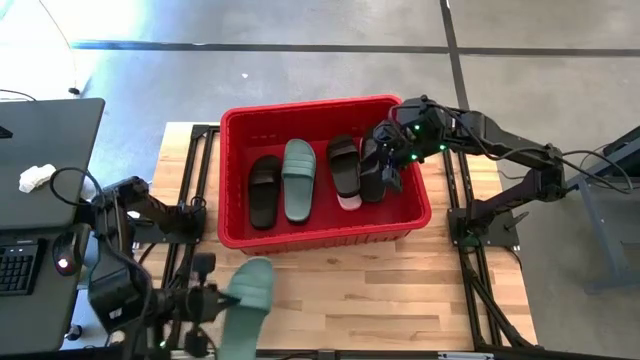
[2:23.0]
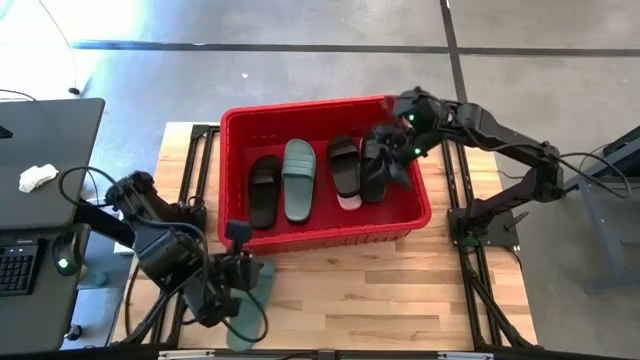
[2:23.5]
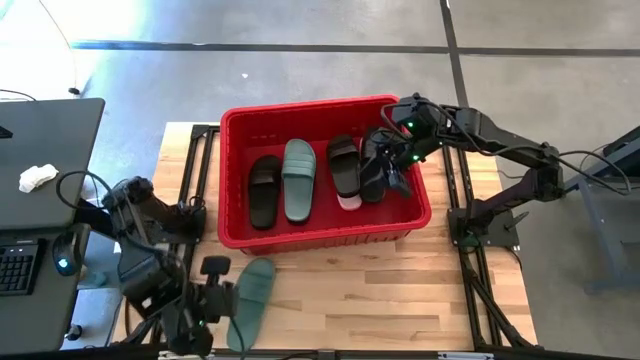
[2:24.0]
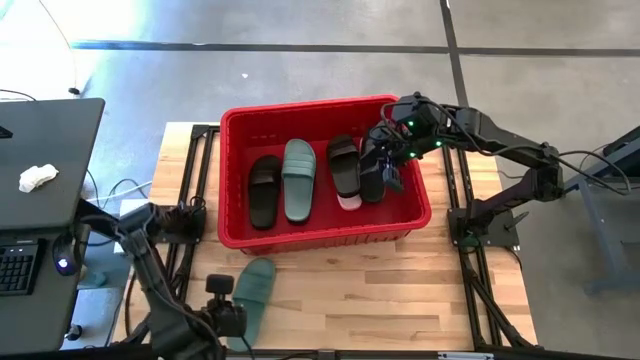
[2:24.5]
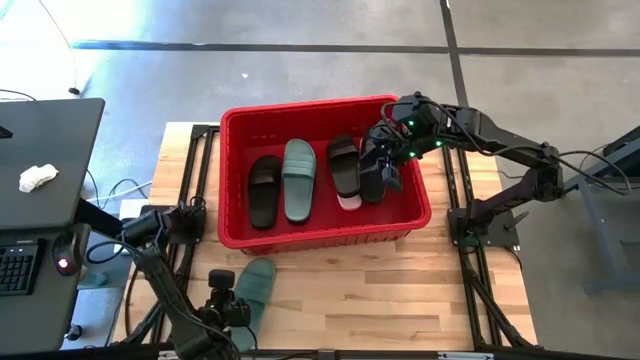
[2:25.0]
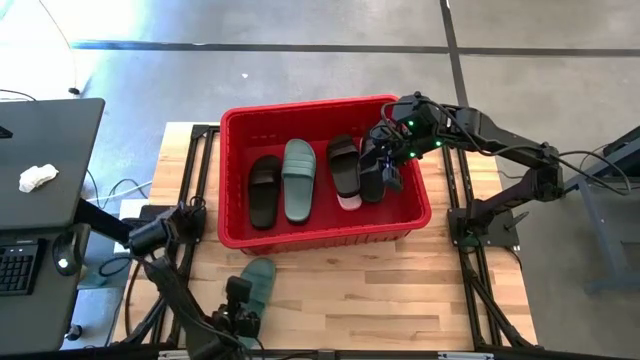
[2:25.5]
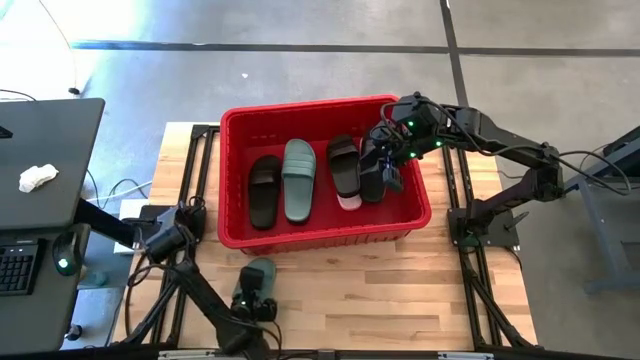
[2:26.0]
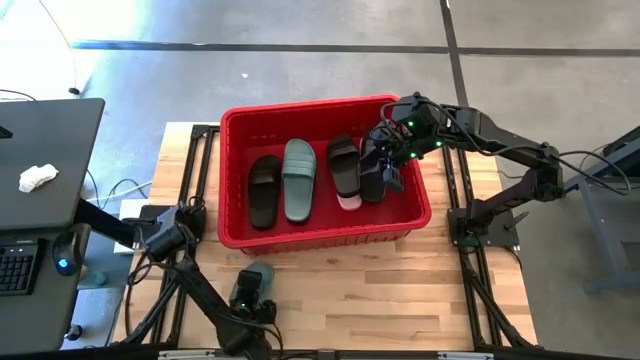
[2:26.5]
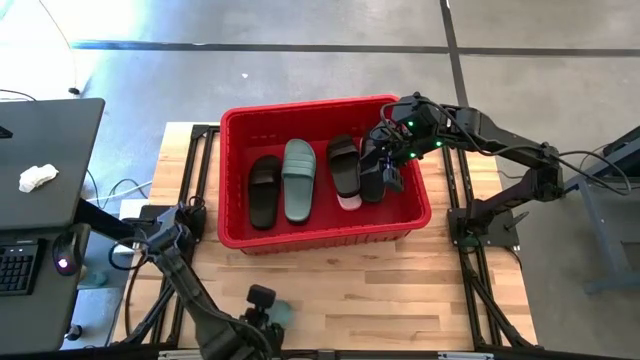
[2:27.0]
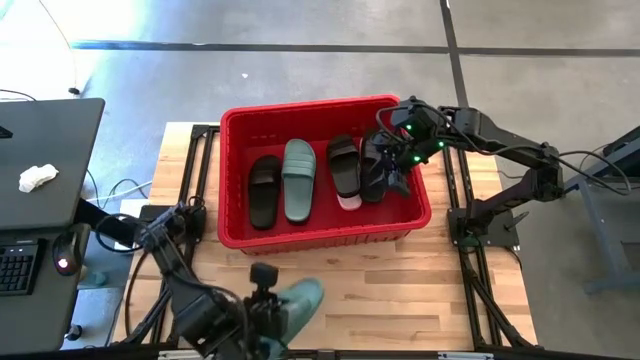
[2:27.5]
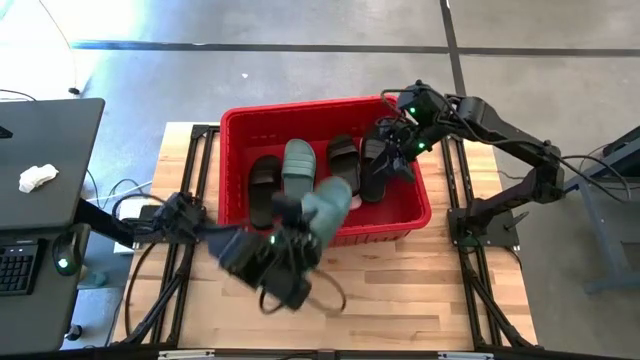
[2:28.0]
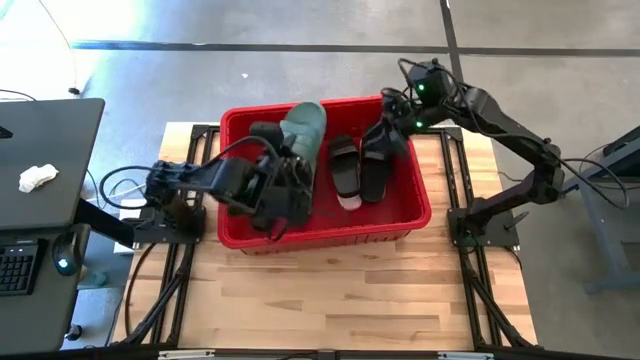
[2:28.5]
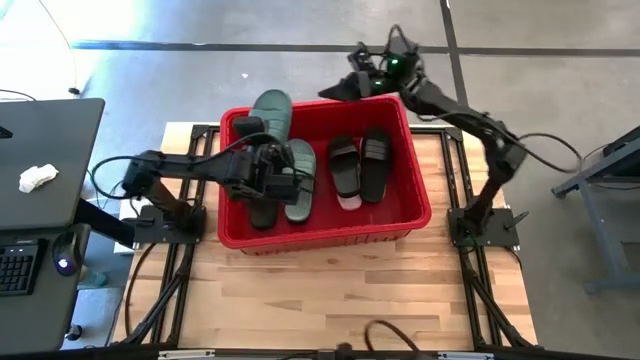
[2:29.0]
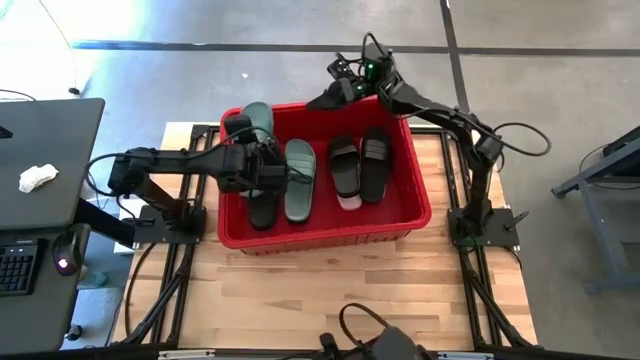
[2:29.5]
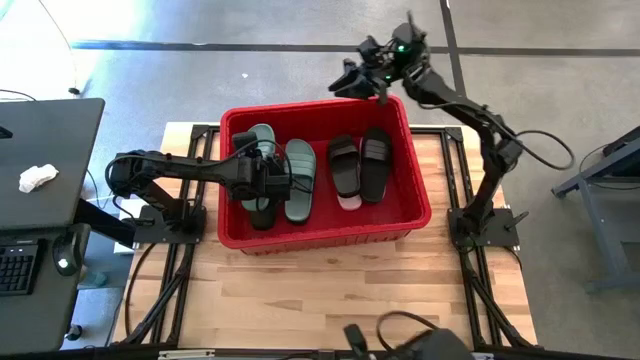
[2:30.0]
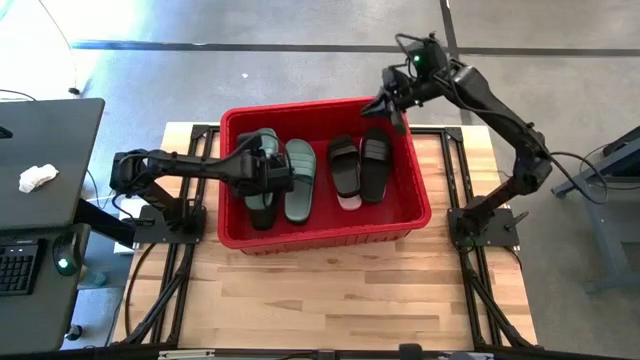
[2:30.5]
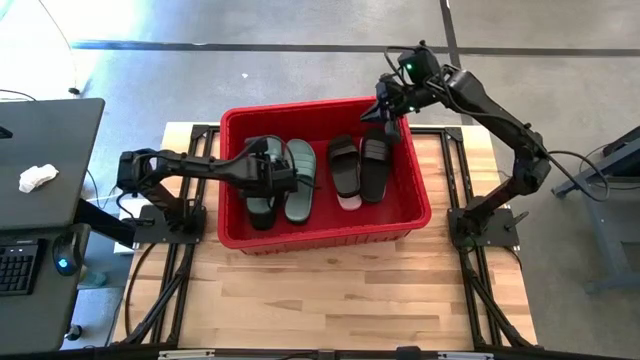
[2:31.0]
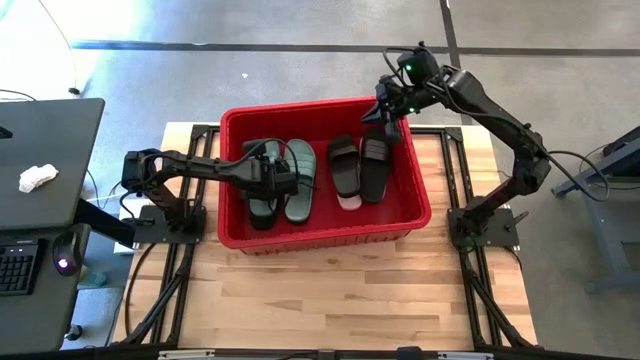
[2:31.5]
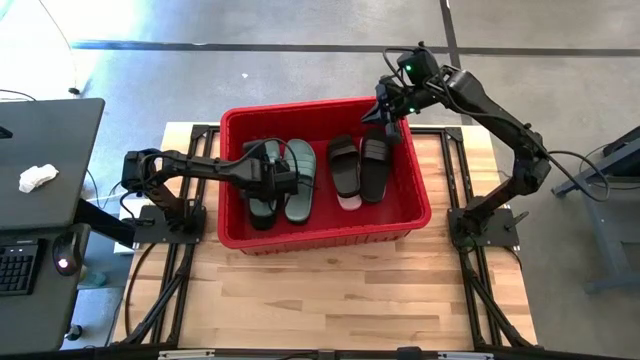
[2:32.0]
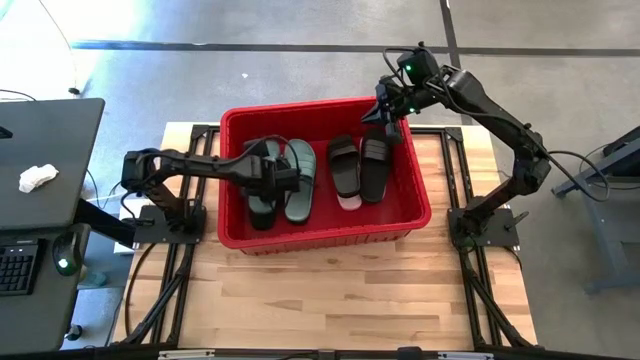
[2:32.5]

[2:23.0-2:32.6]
Task: Pick and place slides into bin
Stack the green slipper on top of the black slipper in the red bin

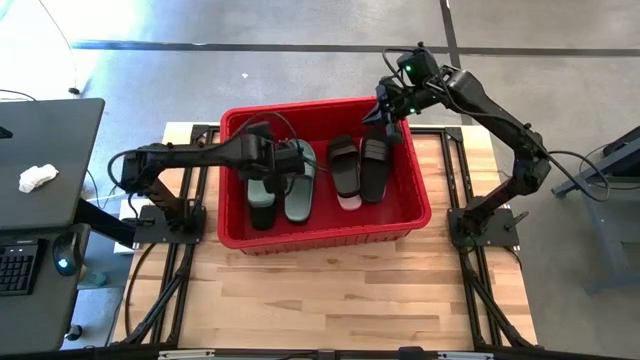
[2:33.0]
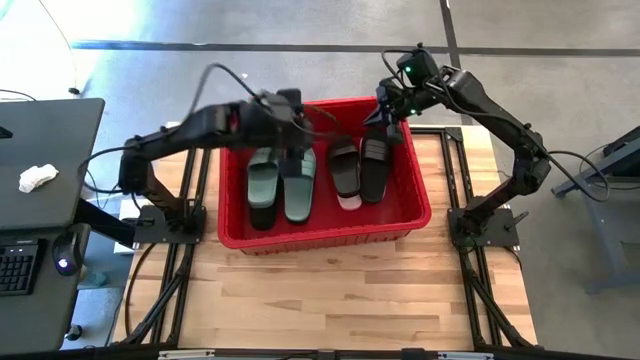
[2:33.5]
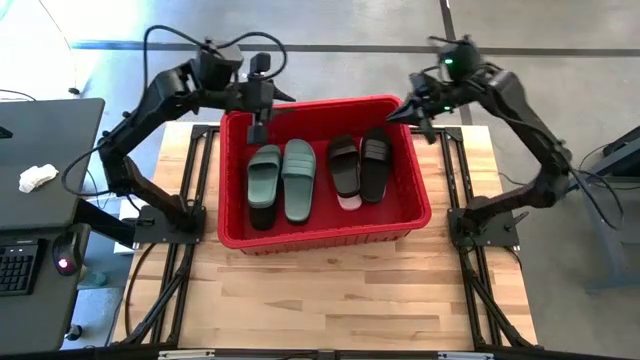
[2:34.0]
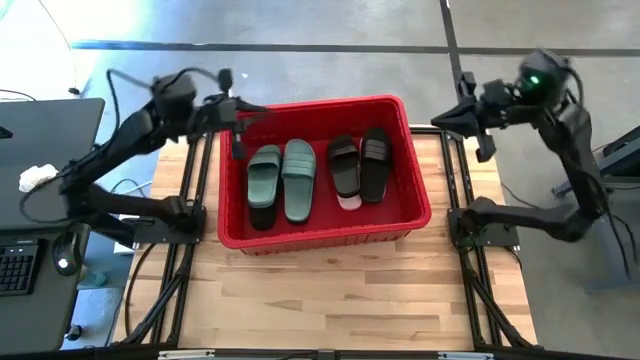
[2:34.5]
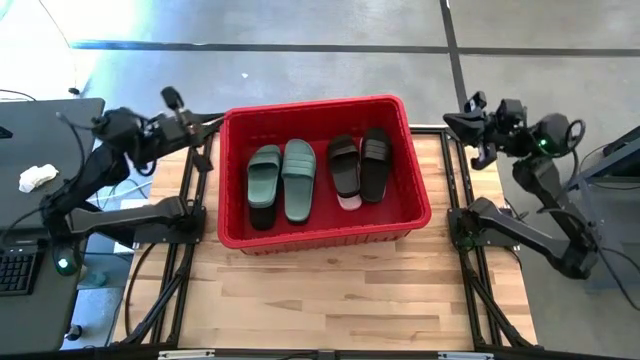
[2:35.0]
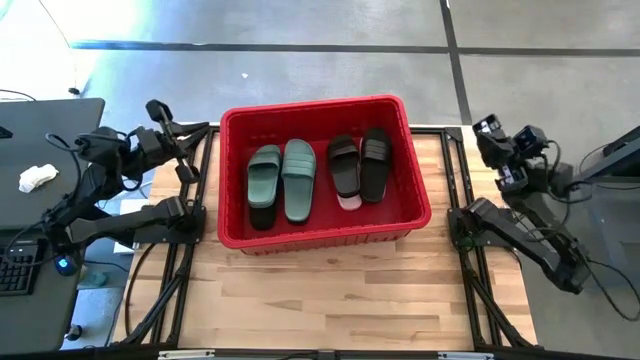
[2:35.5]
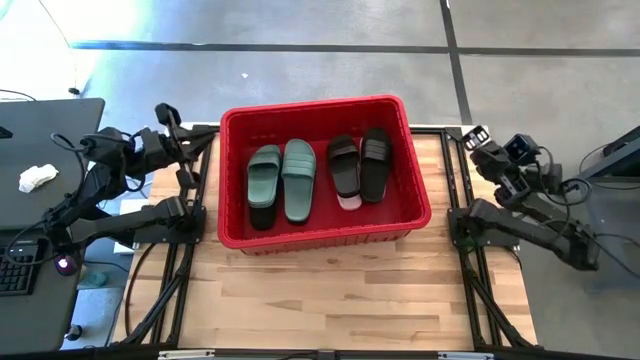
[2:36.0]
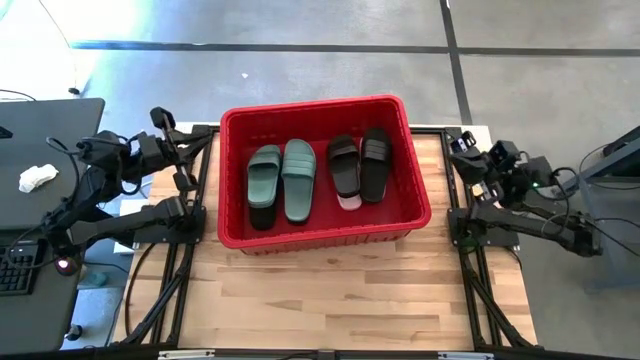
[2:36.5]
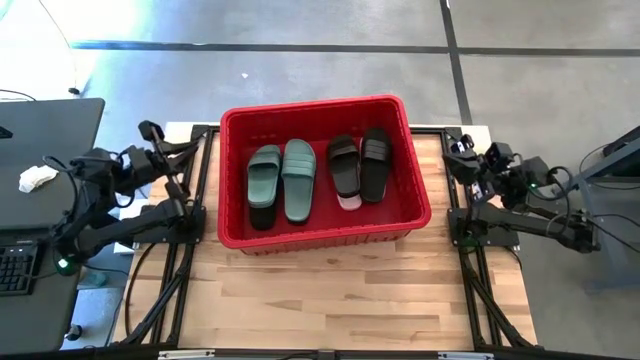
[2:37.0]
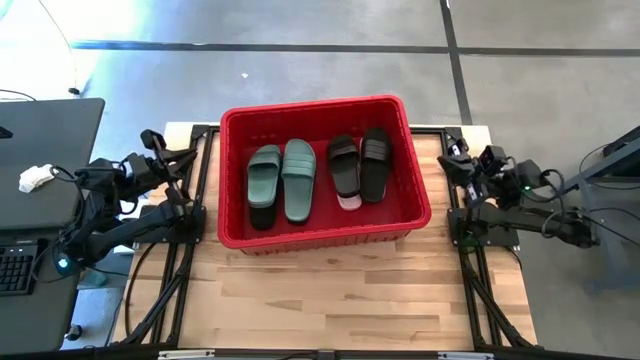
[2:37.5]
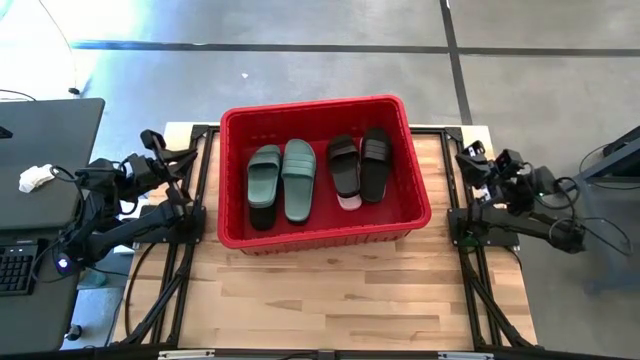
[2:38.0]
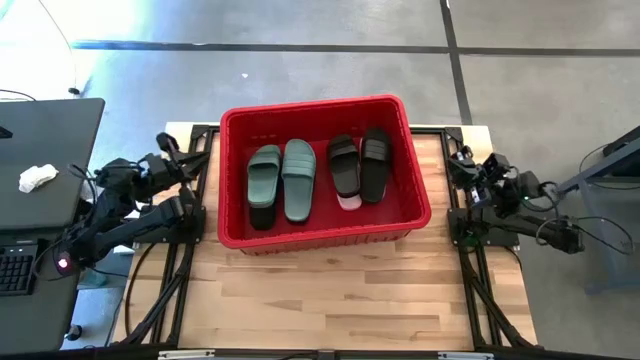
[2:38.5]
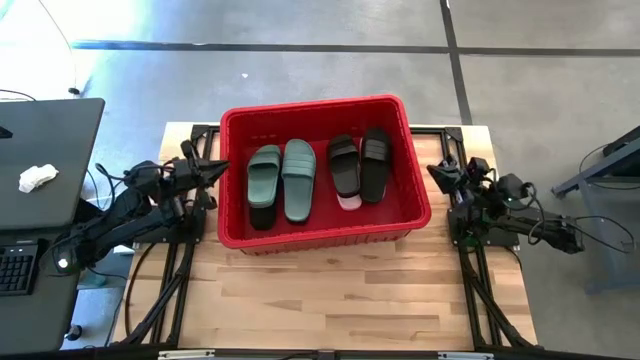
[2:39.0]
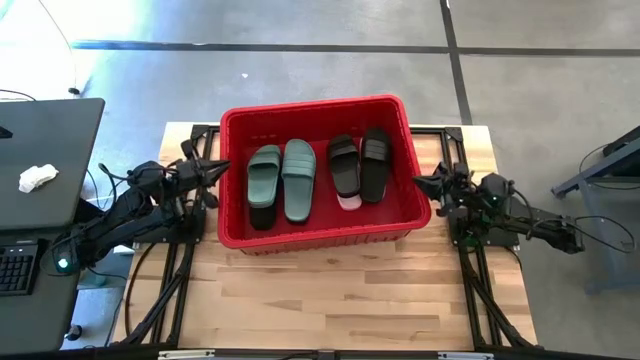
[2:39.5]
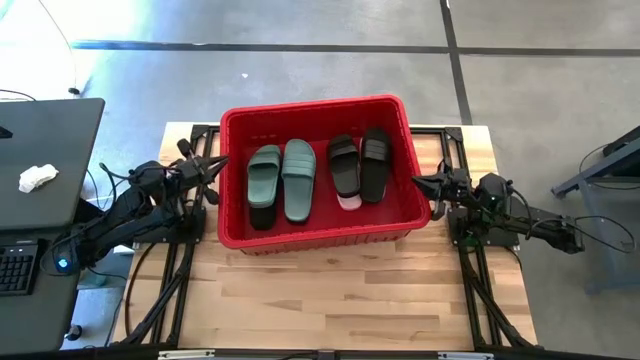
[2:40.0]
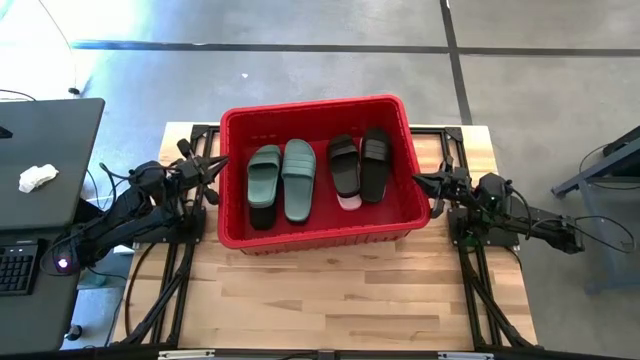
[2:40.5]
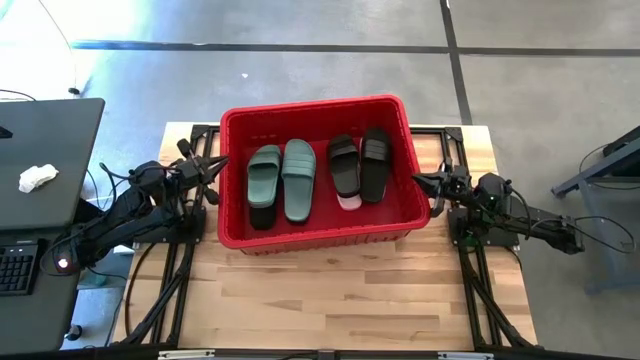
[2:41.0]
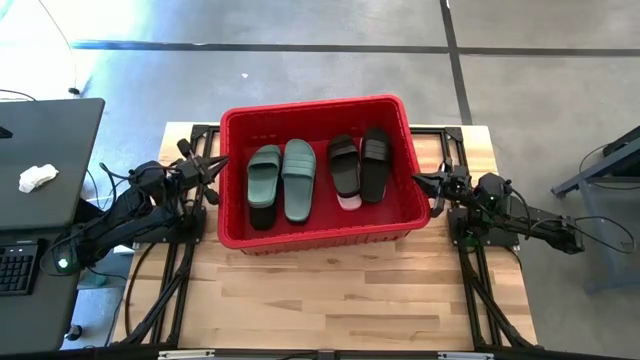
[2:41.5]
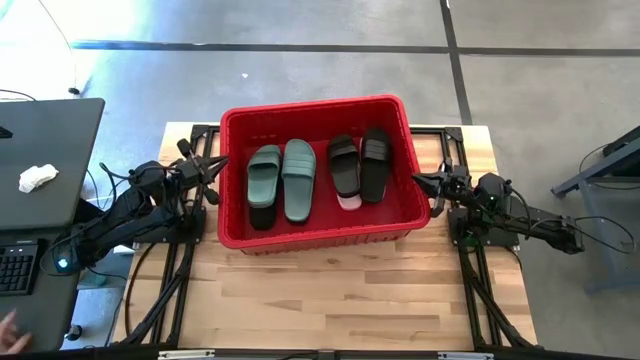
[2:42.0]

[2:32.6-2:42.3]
Return to Home Position

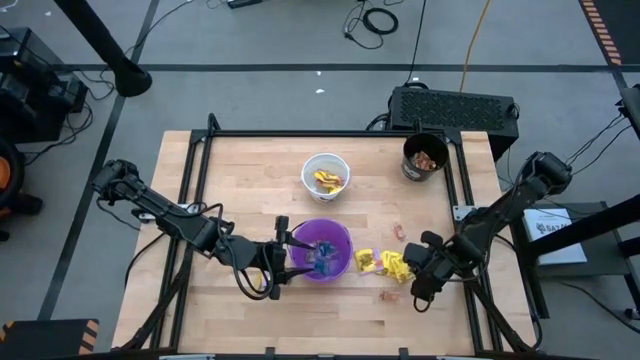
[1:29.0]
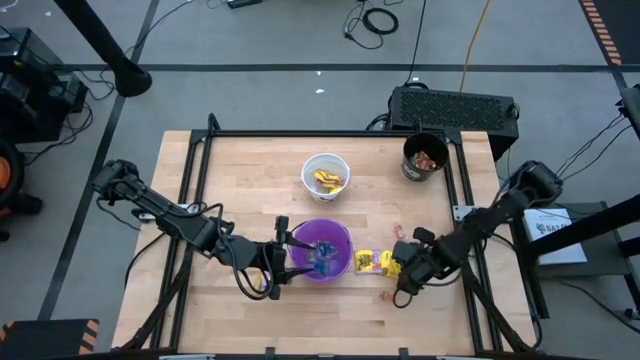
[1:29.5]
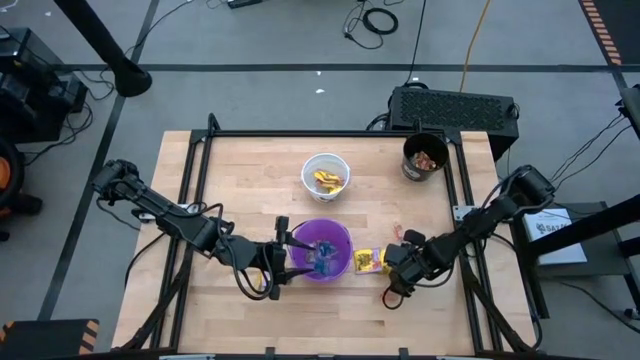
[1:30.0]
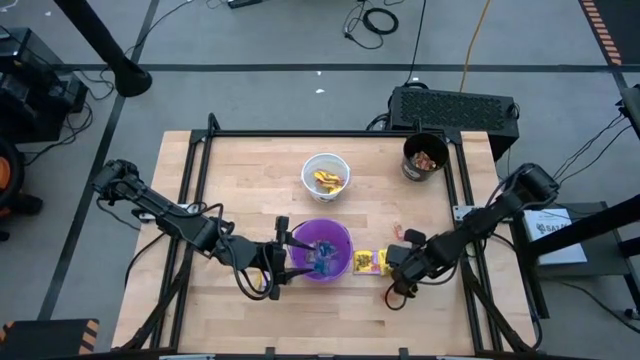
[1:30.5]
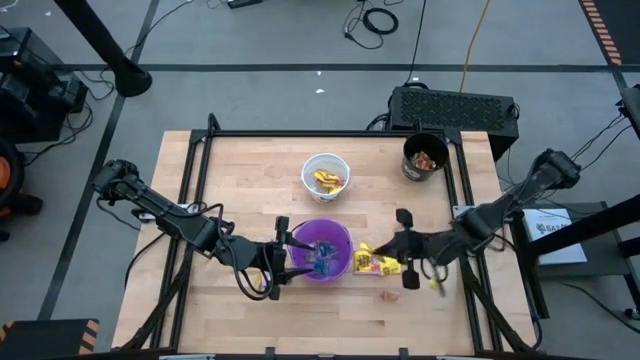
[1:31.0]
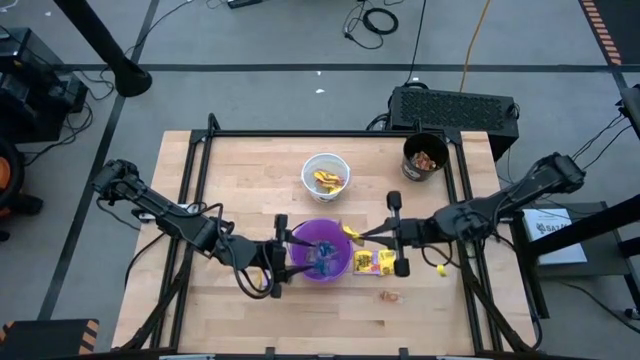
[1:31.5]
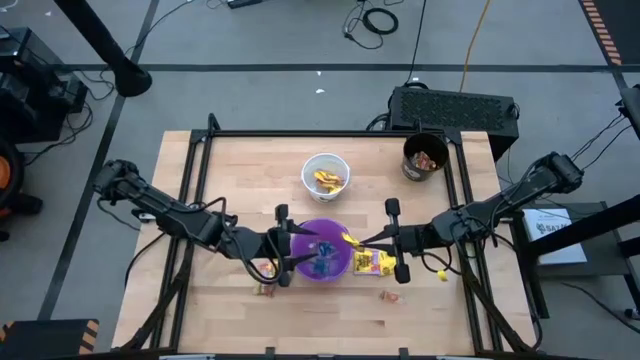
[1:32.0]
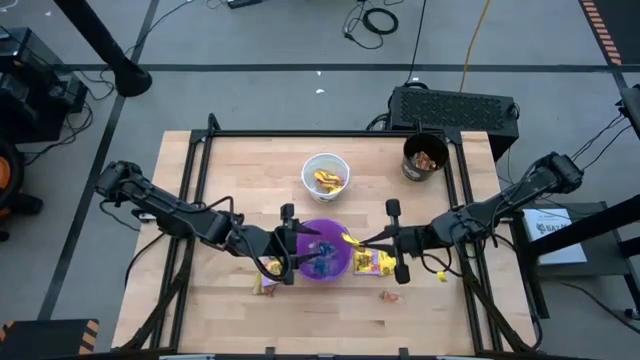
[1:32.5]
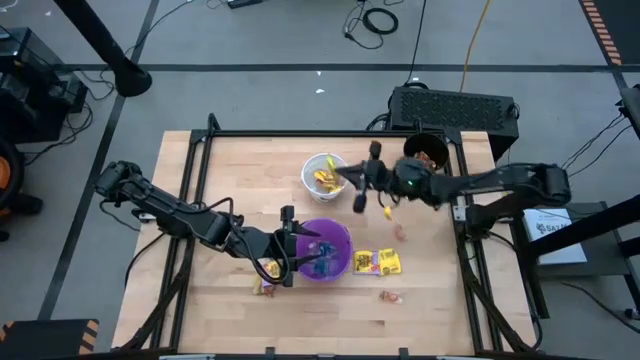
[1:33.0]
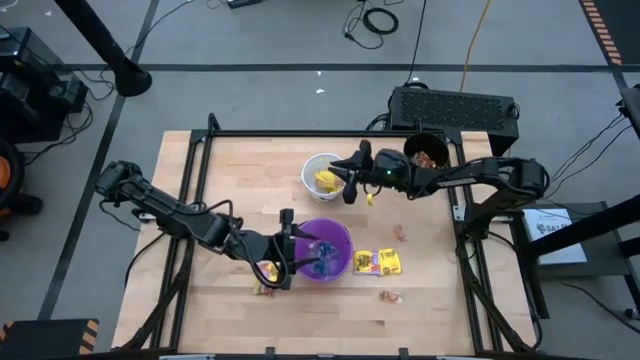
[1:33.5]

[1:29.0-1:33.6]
Task: Sort candy by brand, put in halloween buckets
Put the yellow candy into the white bucket
